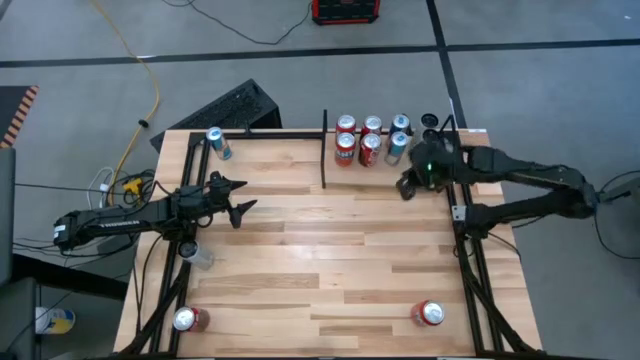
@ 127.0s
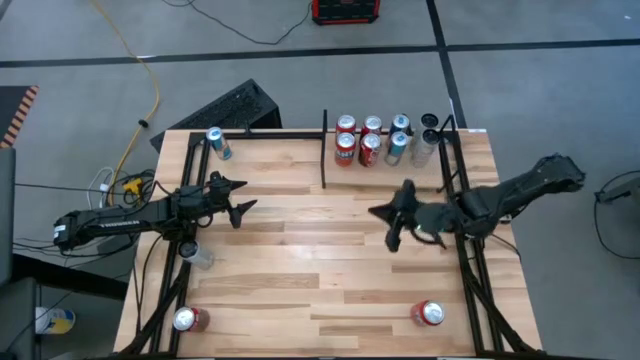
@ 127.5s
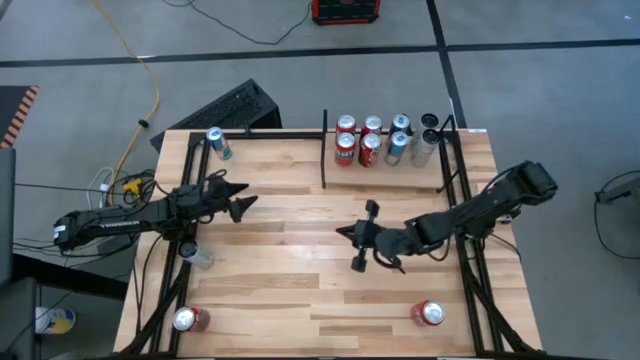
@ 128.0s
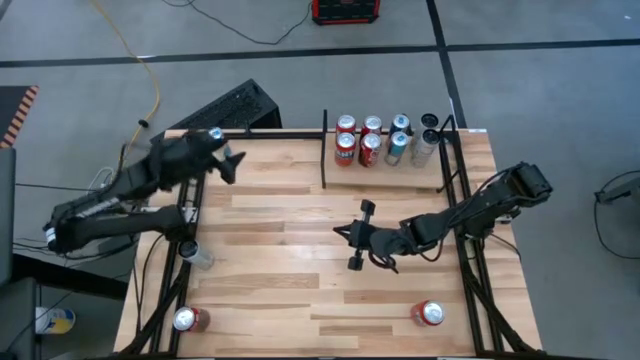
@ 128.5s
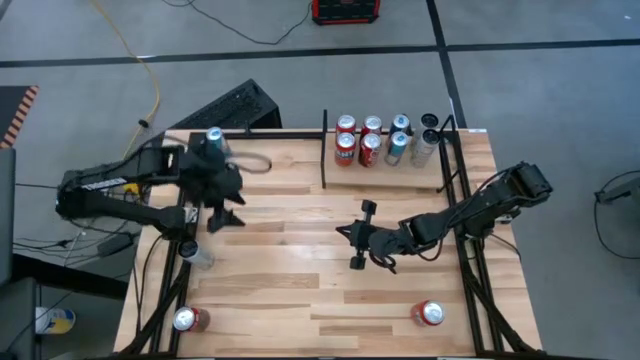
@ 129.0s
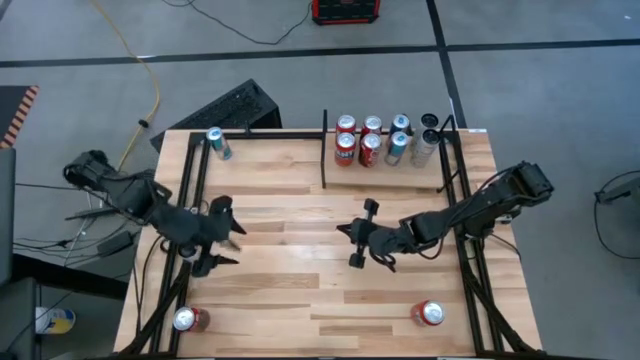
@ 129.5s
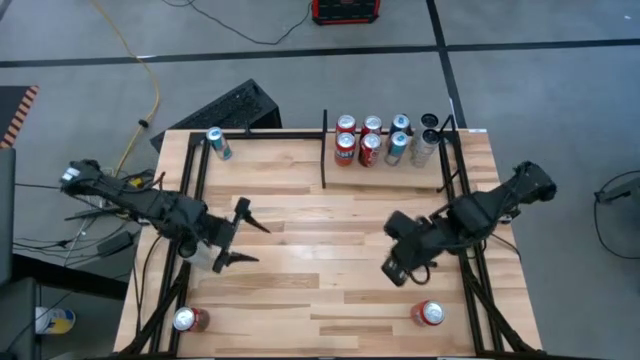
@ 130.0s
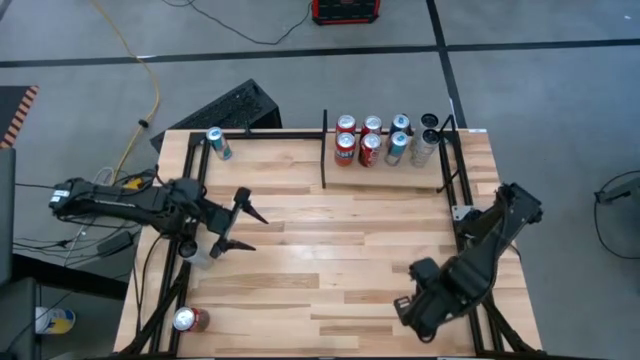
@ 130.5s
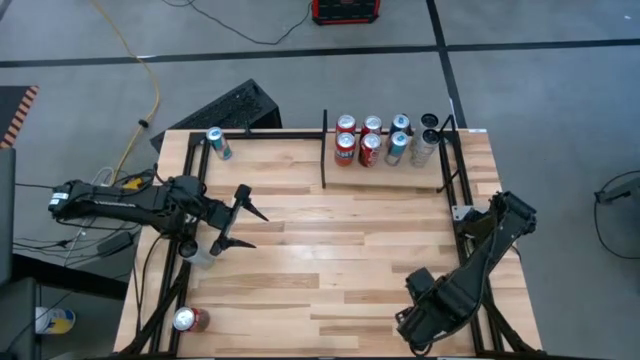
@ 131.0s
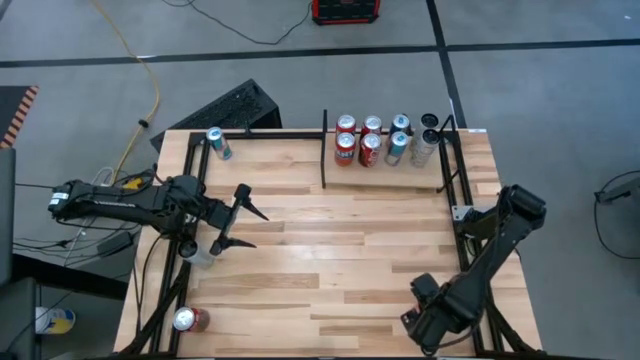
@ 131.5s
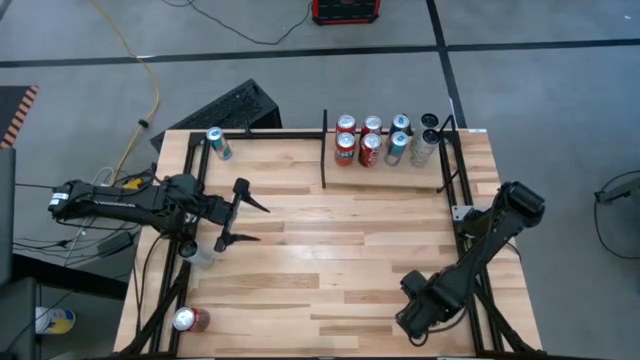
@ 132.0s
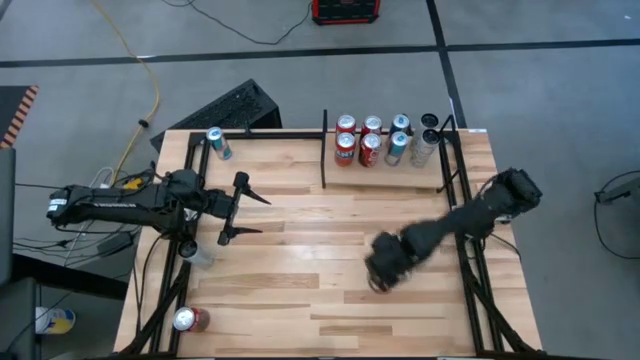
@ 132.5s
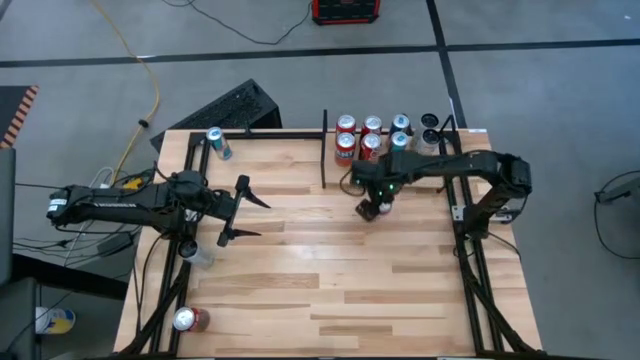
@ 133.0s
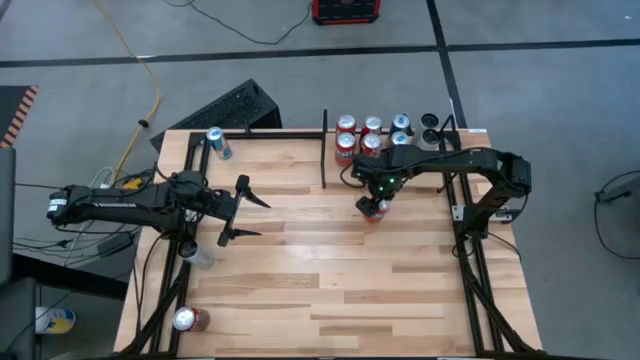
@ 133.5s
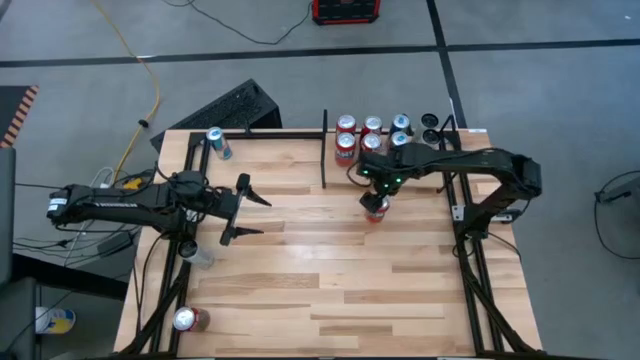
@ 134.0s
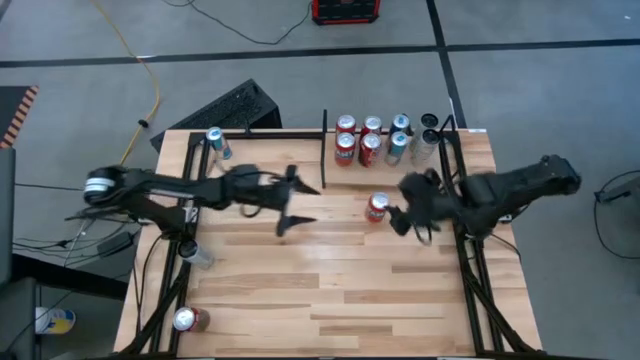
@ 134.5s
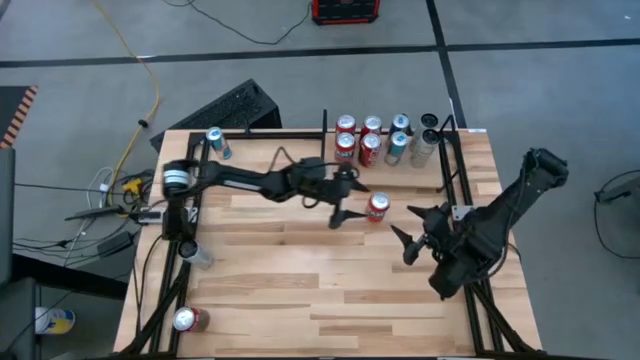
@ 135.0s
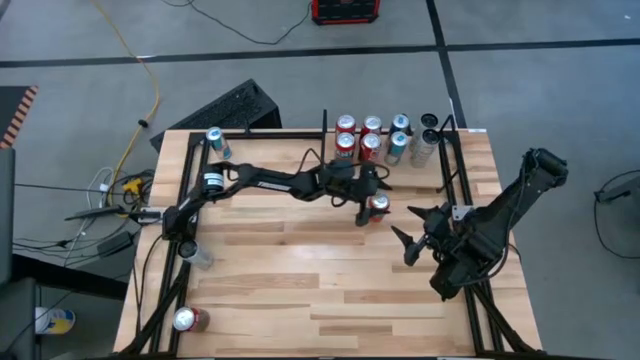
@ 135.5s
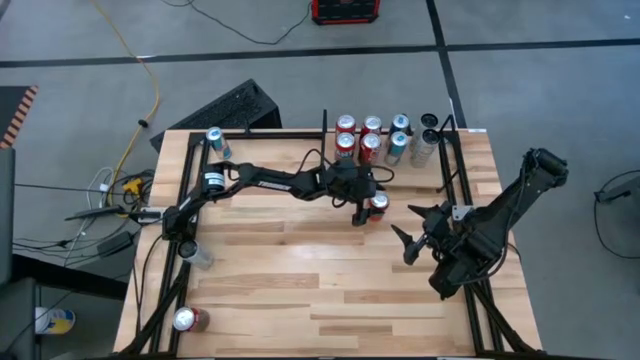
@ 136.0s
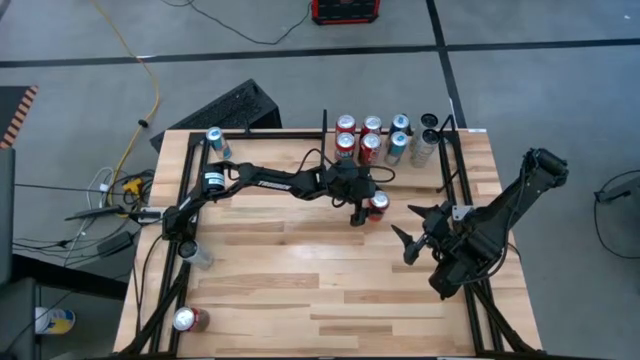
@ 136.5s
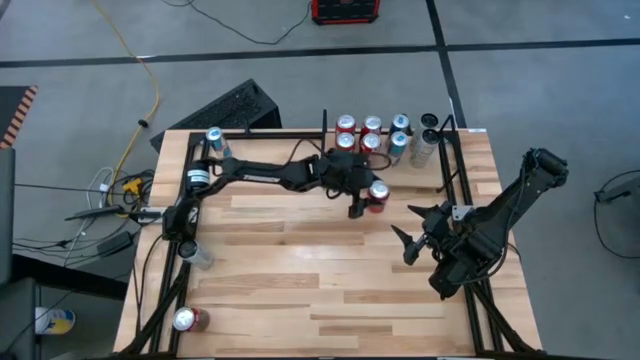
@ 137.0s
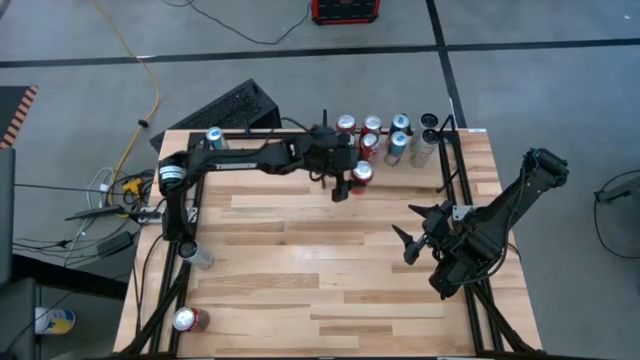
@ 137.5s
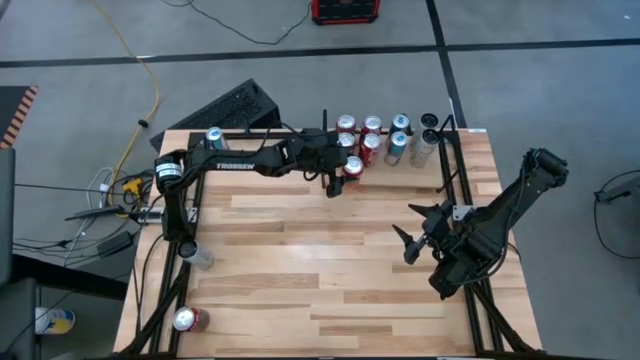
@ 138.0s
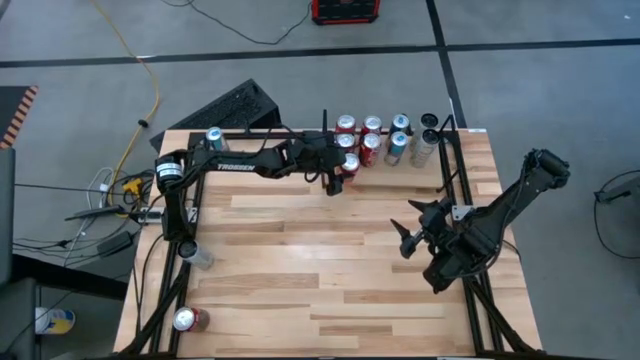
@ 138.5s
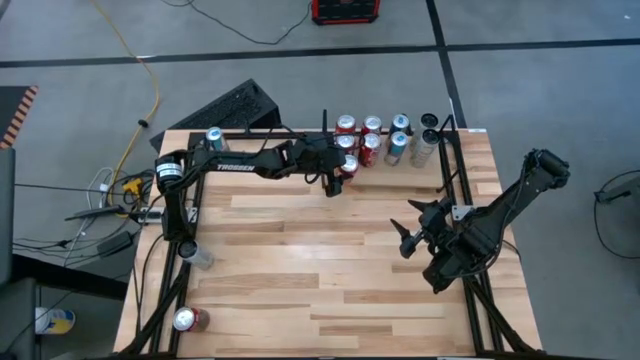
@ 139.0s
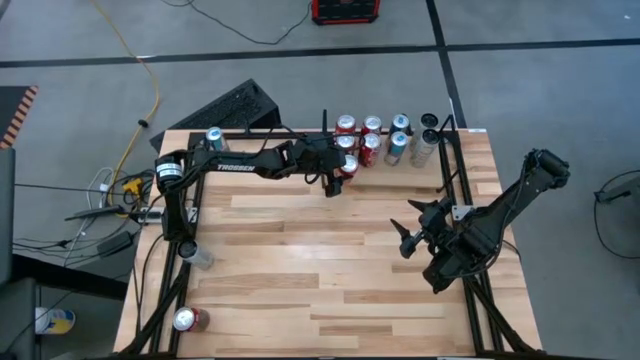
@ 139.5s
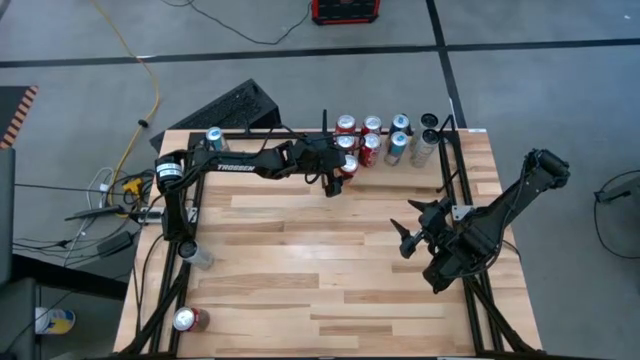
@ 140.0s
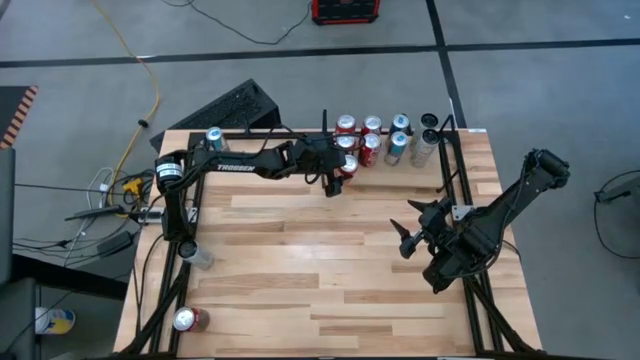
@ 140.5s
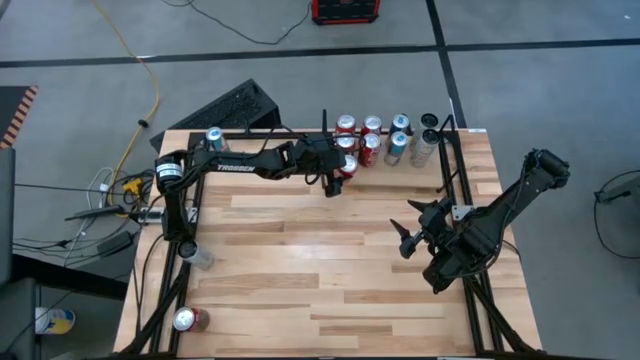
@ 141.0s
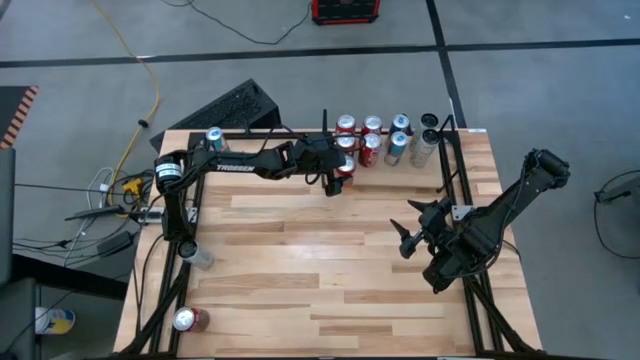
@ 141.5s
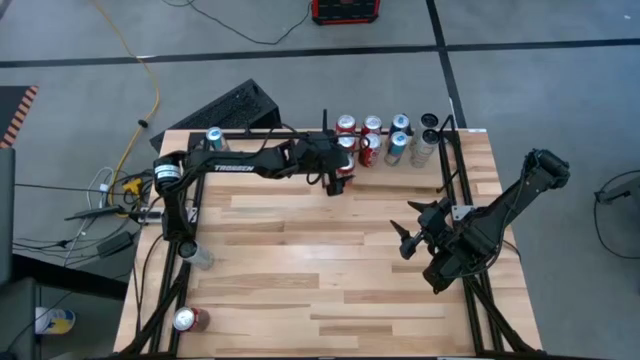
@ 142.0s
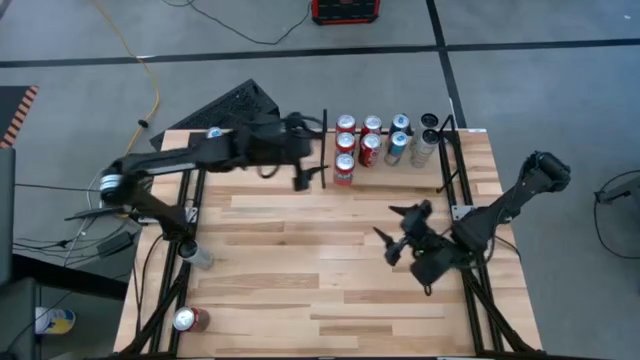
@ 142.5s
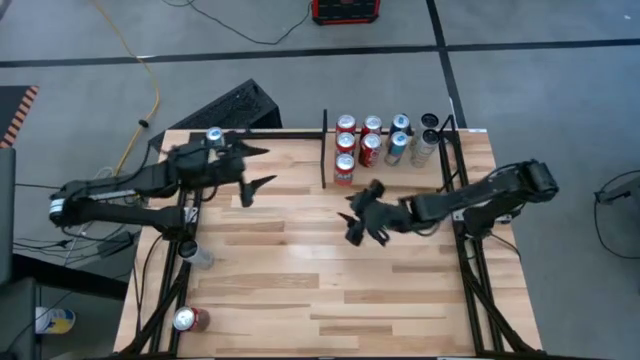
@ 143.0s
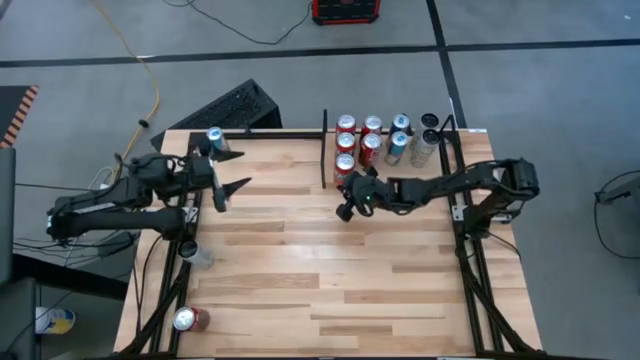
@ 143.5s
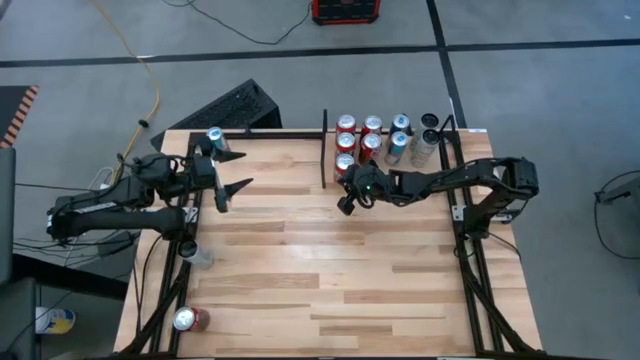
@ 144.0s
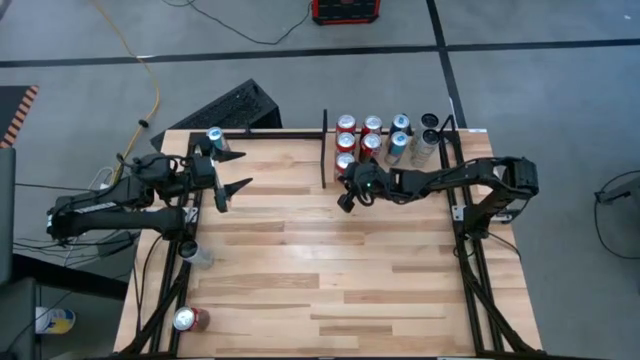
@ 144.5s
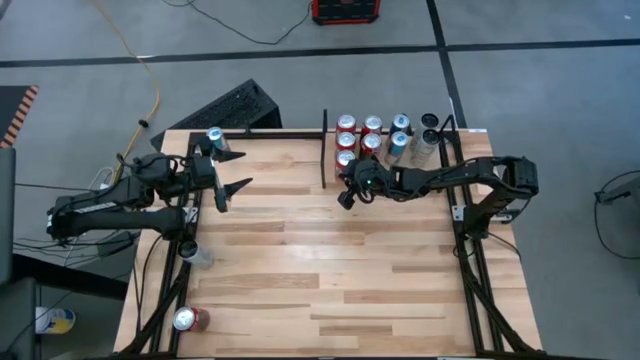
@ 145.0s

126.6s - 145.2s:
Task: Place canned beverage on shelf
Put the orange soda can on the shelf aligned with the other soda cans

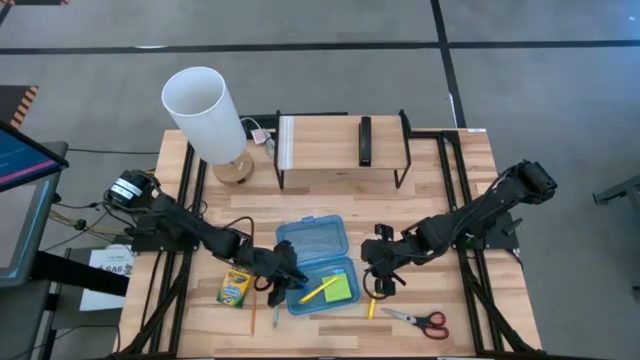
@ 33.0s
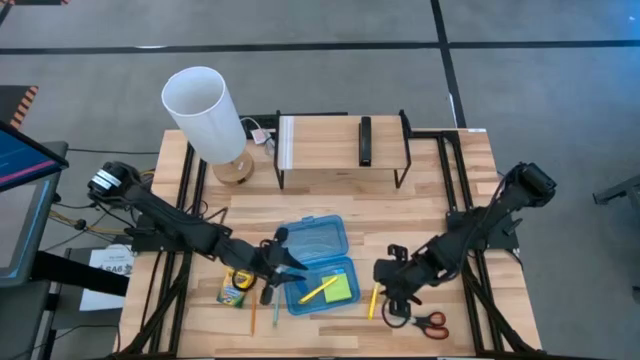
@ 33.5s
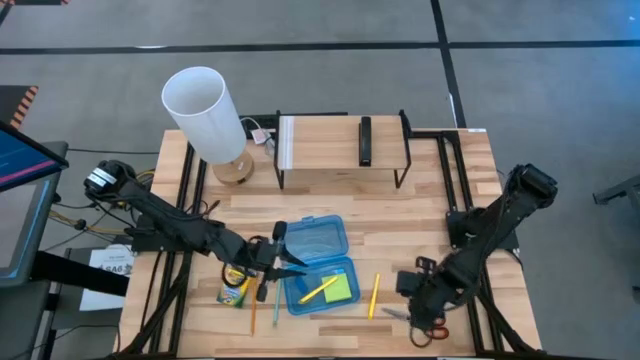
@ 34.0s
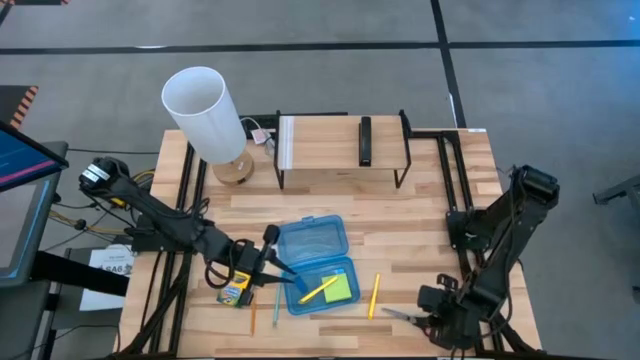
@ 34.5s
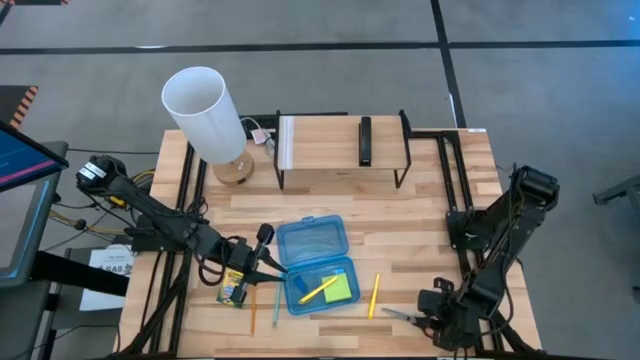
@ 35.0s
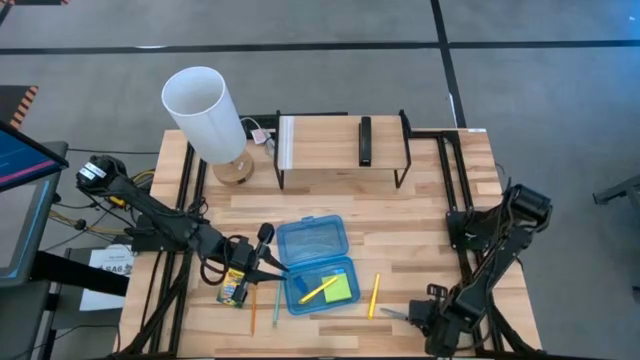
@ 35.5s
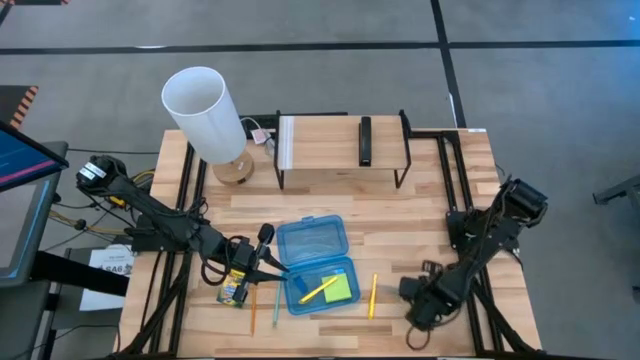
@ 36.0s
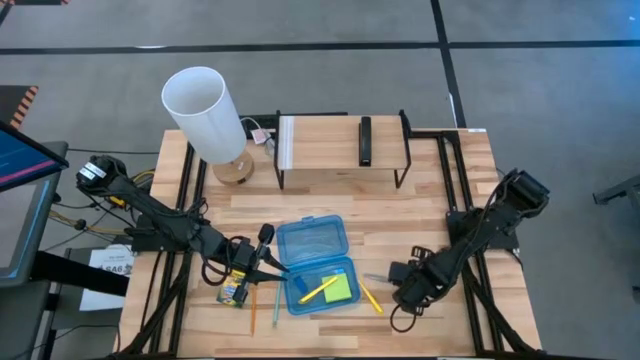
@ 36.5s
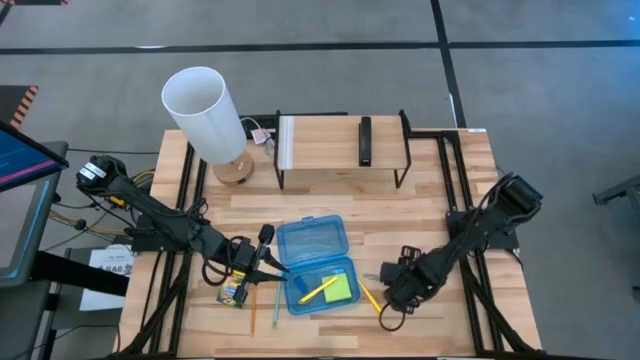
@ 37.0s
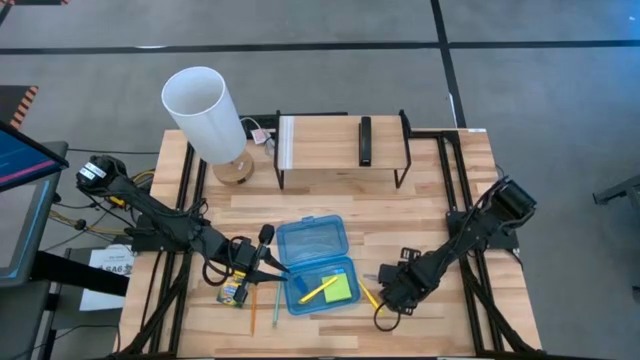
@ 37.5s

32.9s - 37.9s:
Task: Pack school essentials
Put the black scissors into the blue supply box
